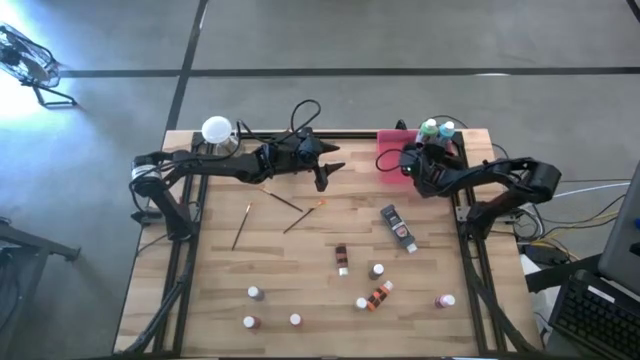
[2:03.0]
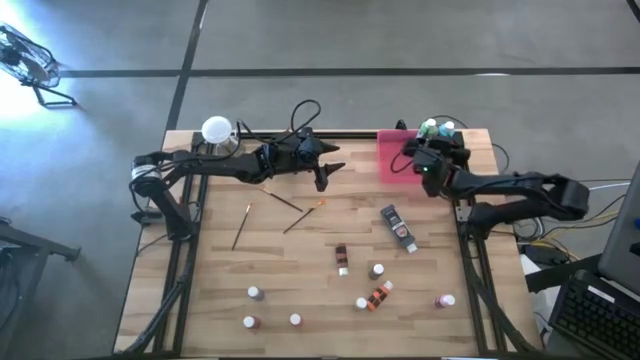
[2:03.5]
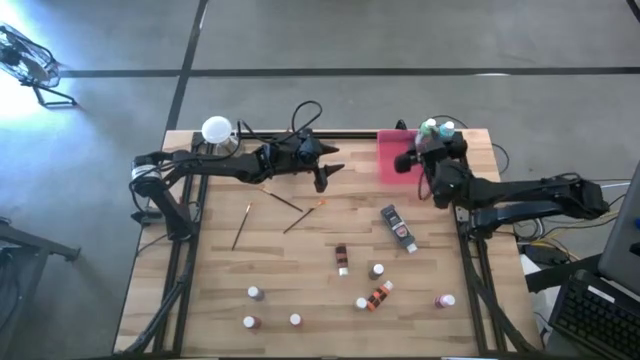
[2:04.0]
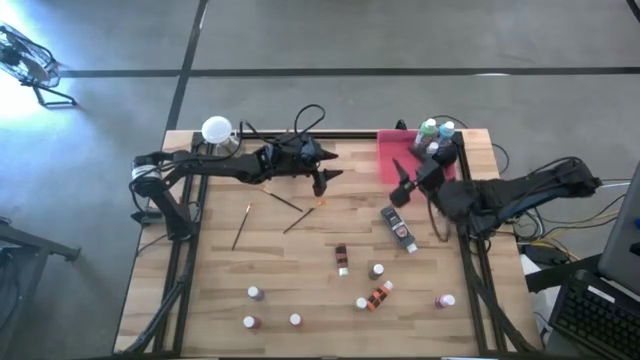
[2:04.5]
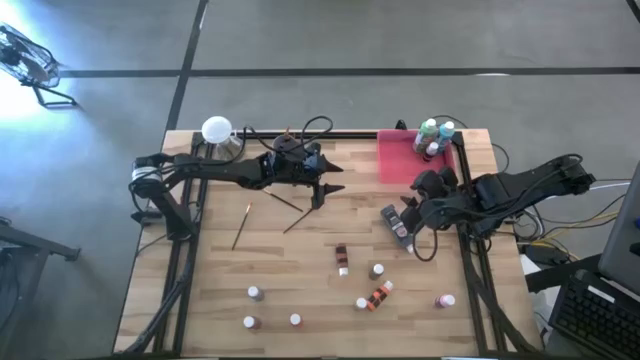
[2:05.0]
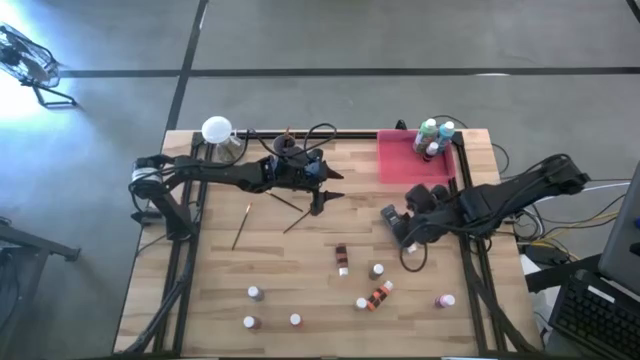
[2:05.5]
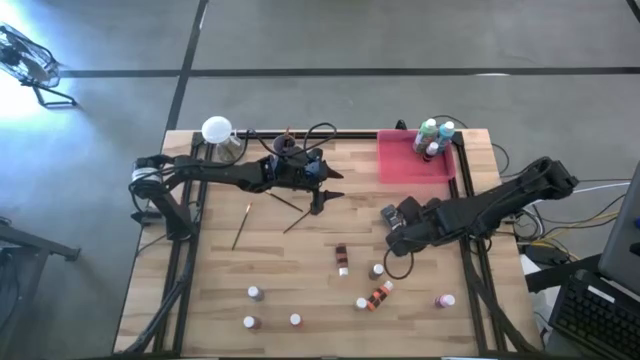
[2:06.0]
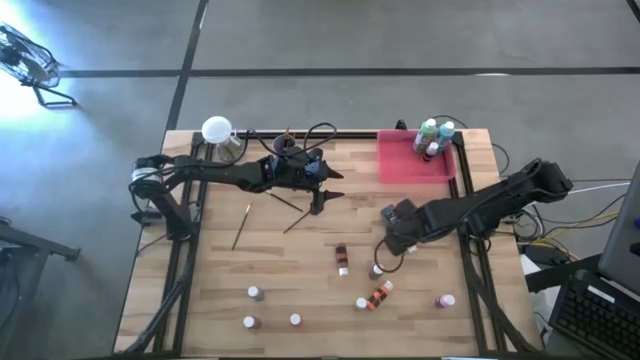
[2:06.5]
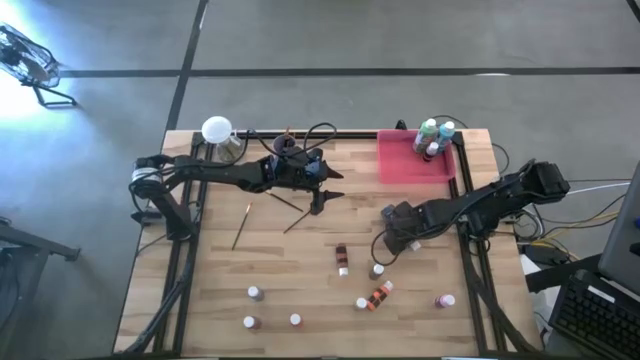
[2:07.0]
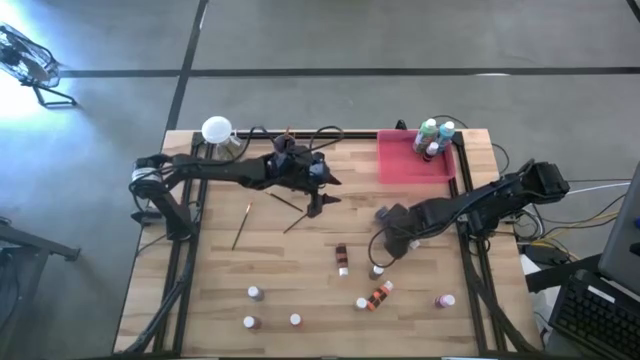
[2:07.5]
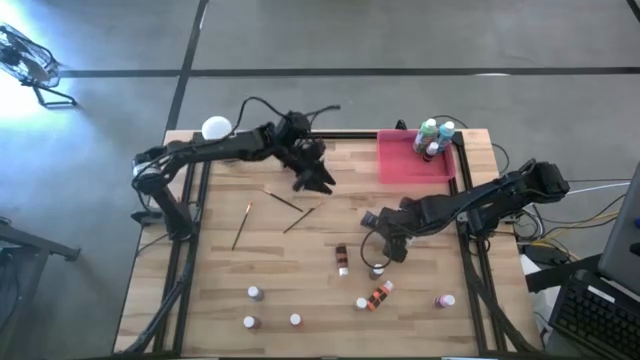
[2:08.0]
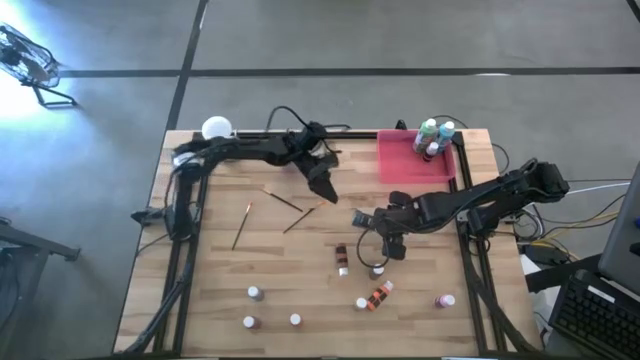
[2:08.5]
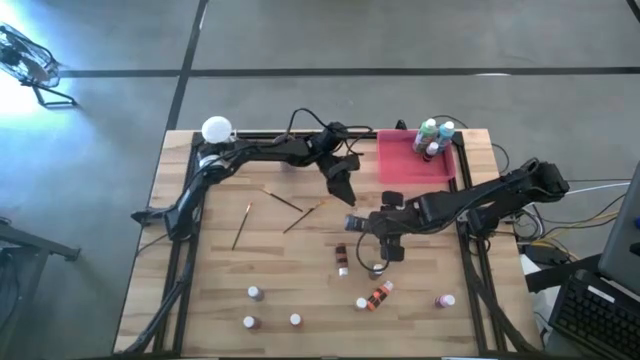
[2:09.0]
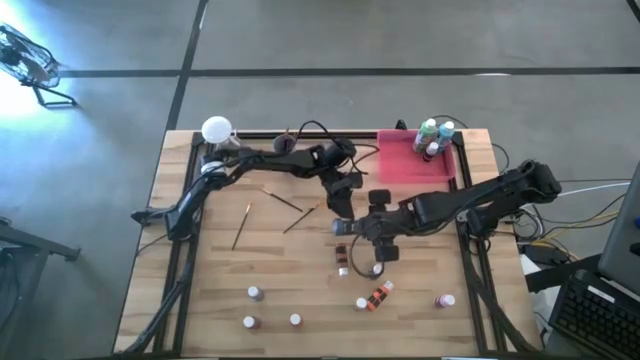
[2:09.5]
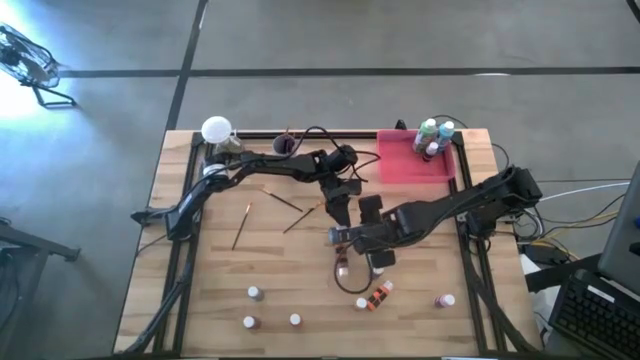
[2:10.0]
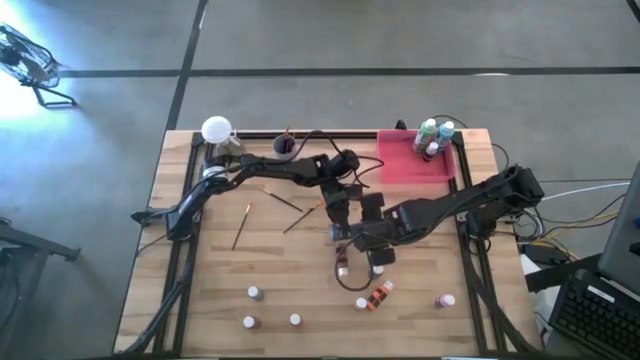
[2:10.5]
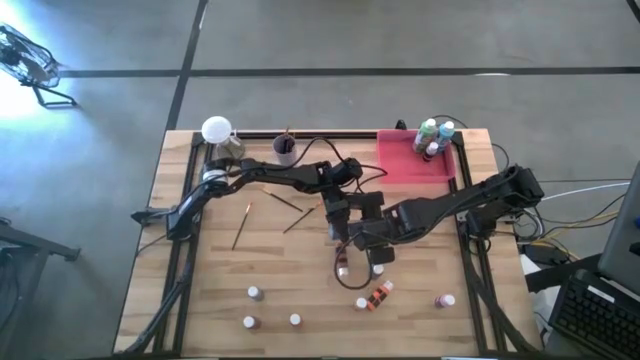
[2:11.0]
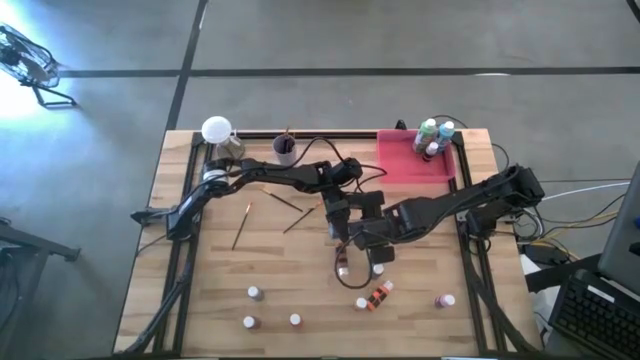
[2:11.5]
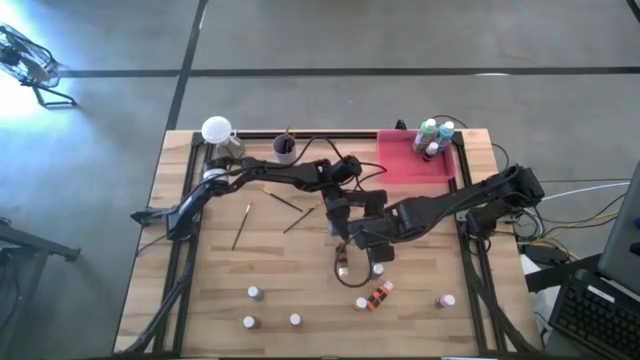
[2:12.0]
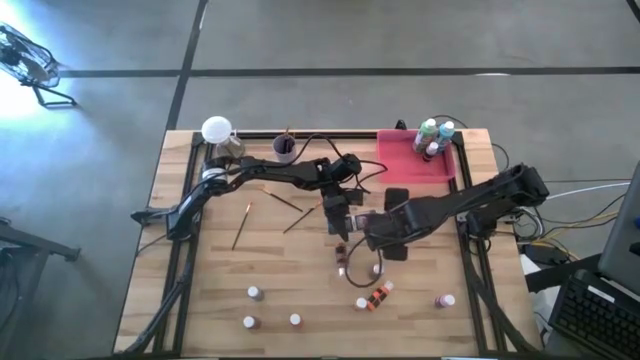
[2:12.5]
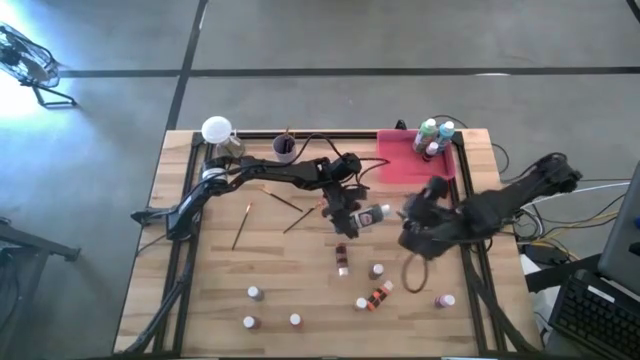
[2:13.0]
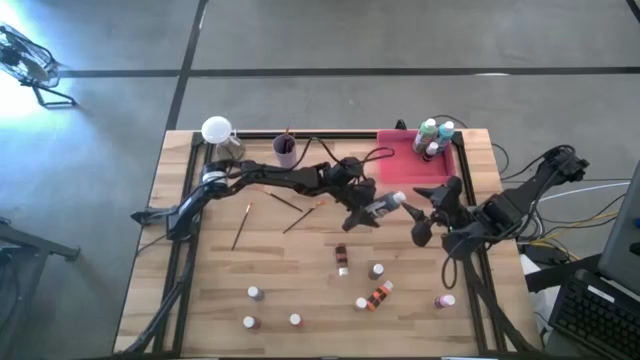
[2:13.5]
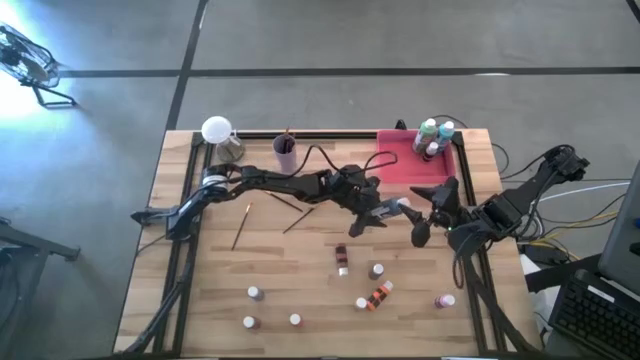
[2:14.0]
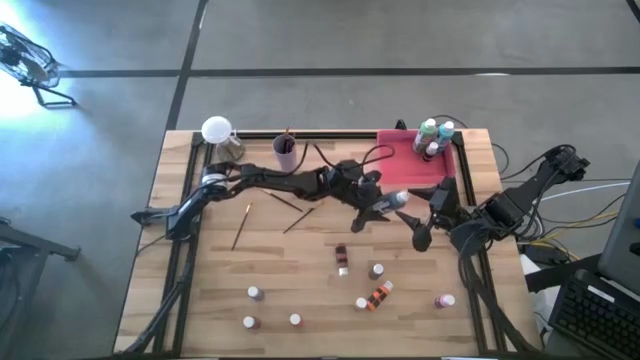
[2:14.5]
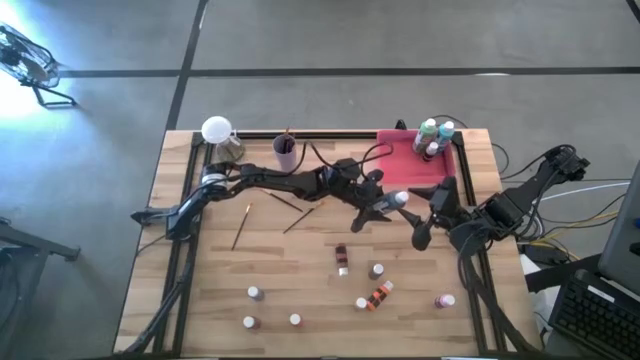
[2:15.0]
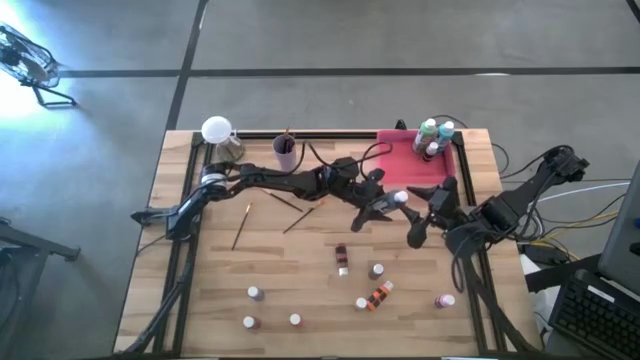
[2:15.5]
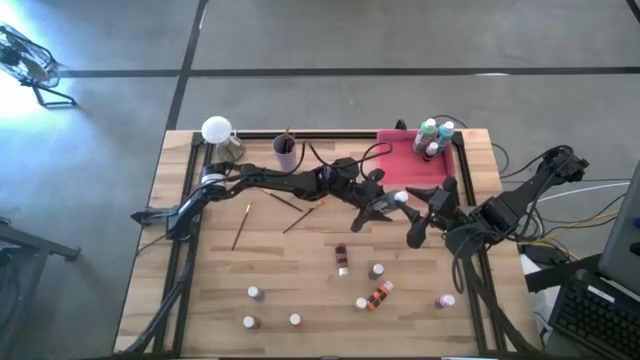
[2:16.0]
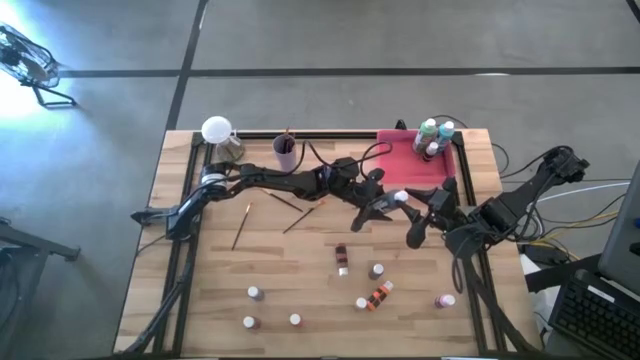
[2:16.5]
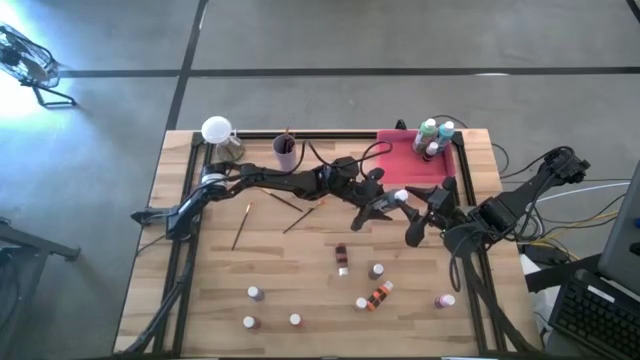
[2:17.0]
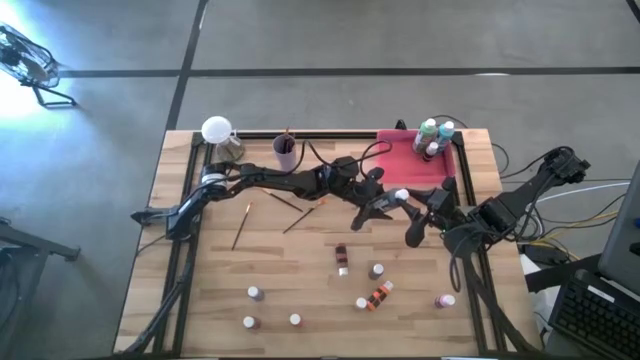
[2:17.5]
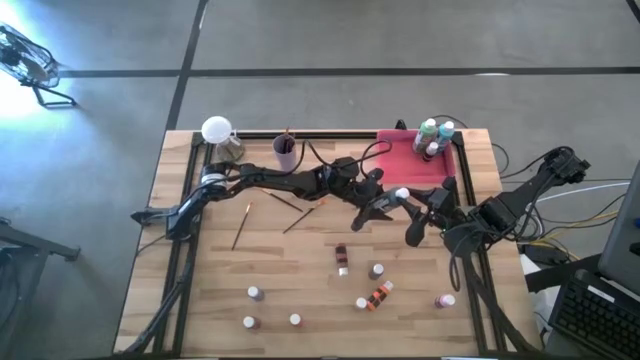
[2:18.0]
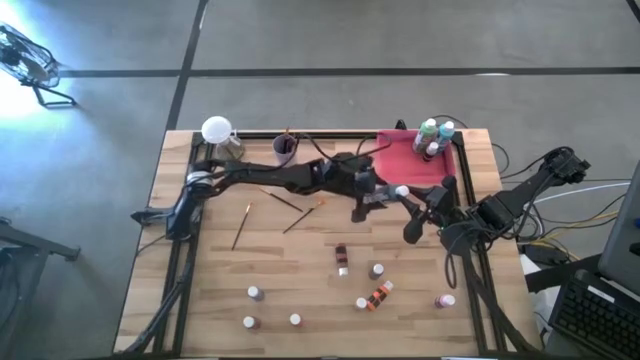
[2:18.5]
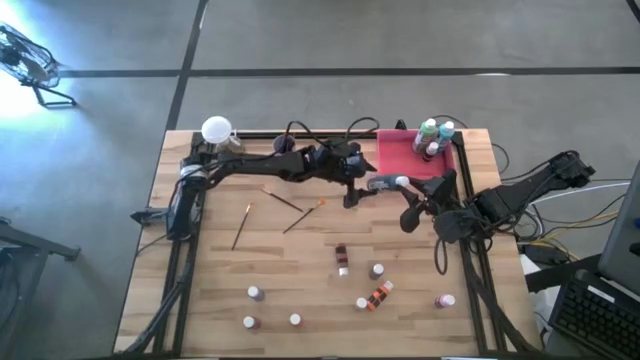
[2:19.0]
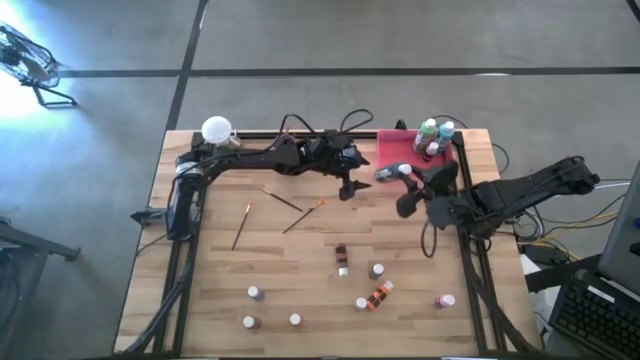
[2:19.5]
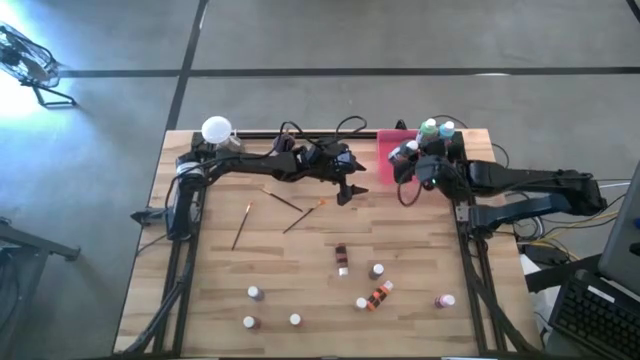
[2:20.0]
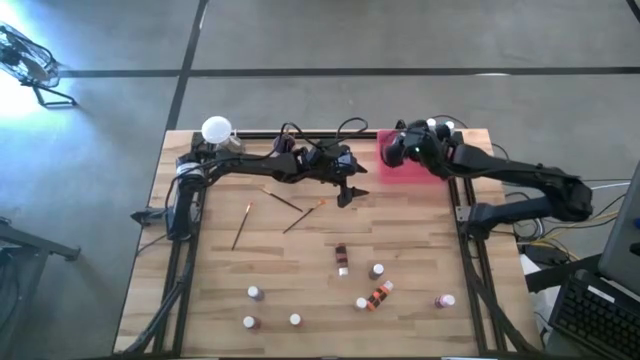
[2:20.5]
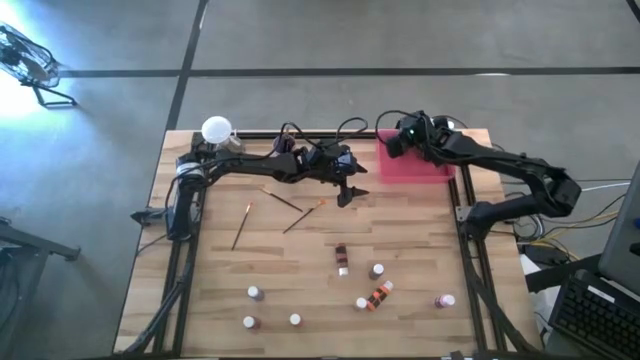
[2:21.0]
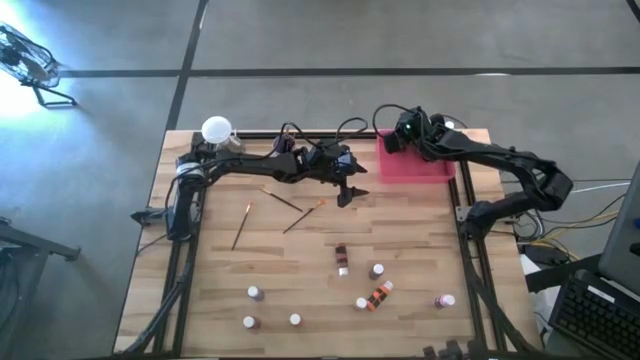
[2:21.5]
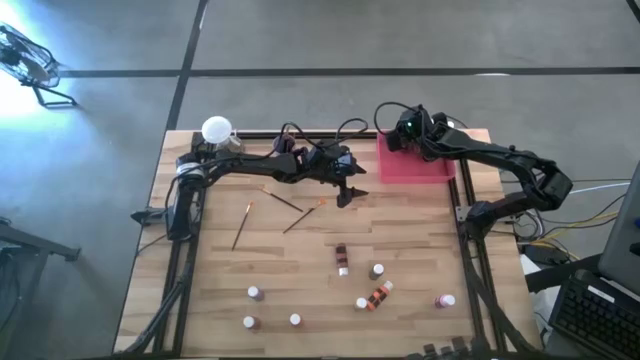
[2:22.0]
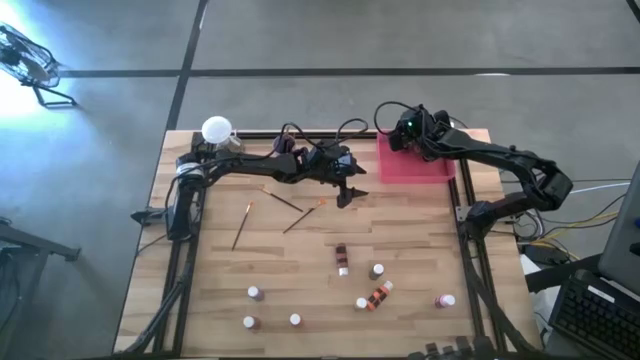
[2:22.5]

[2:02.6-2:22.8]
Task: Pick & Place Paint Supplies
Put the large black paint bottle into the pink bin

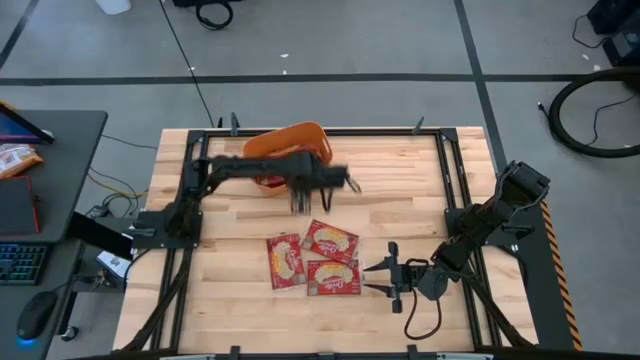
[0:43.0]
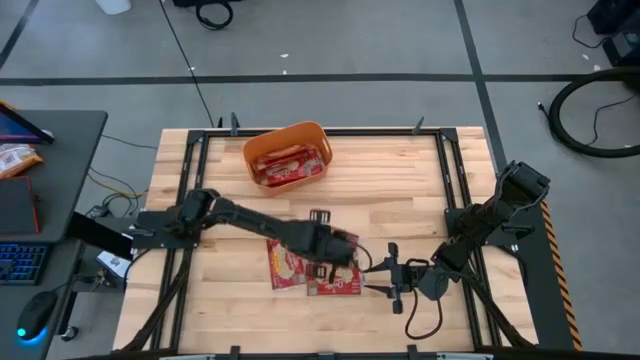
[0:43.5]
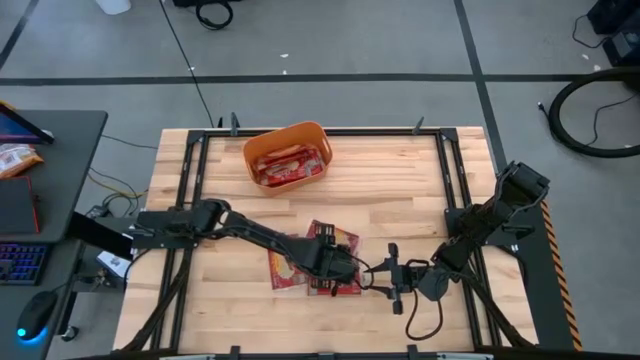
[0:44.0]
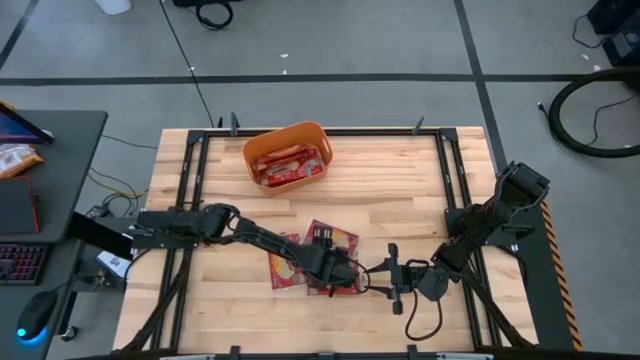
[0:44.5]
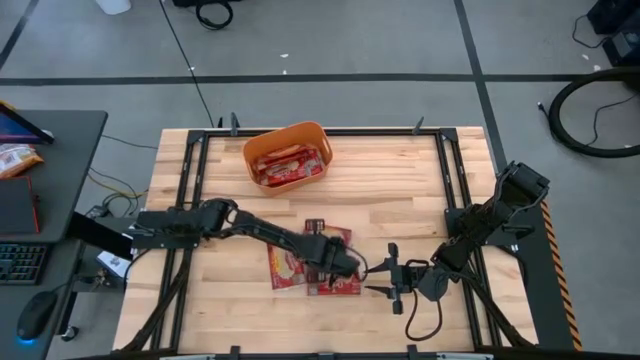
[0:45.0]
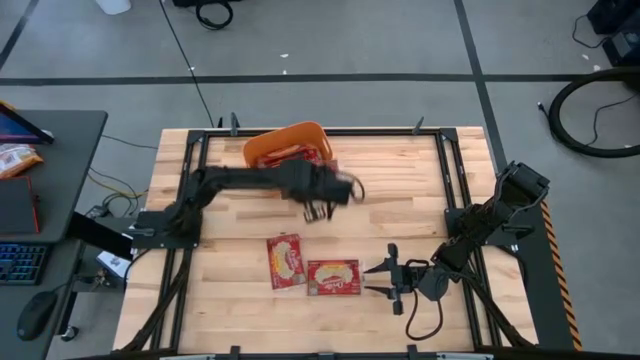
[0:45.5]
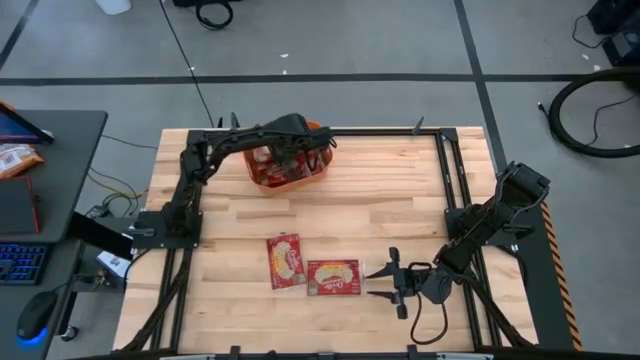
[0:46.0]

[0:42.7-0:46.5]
Task: Sort popcorn bags into baskets
Put the red popcorn bag into the orange bin
